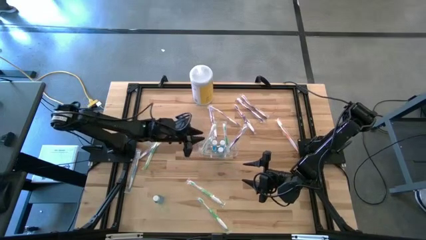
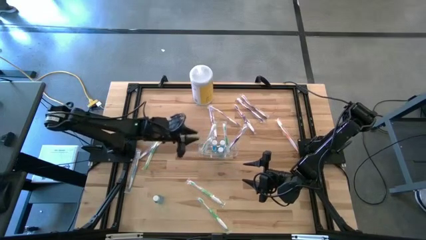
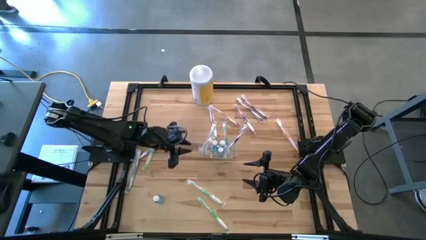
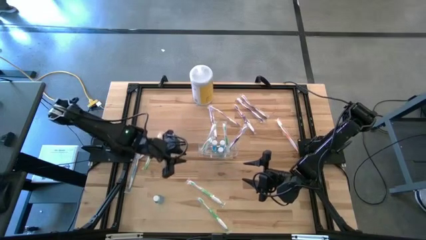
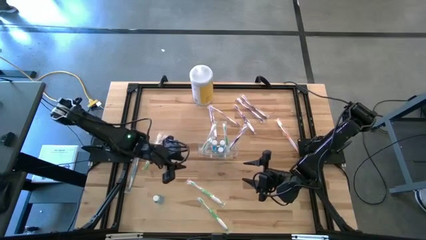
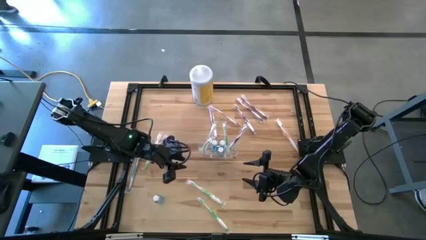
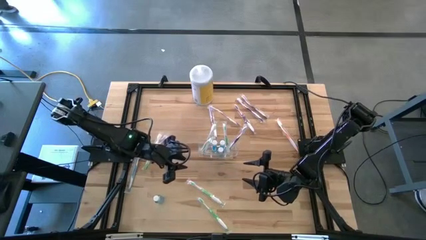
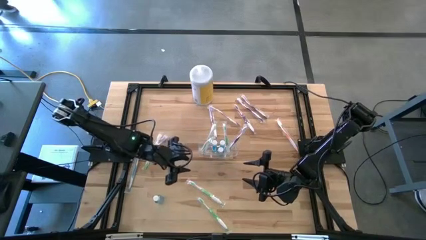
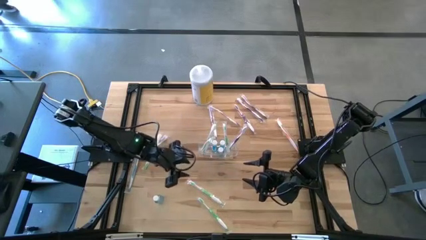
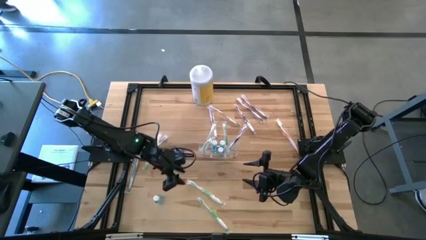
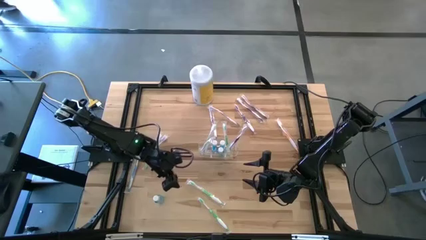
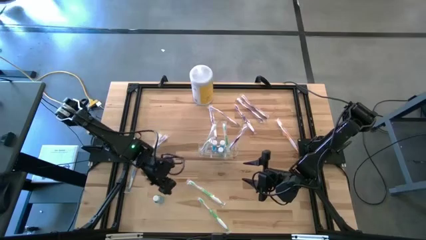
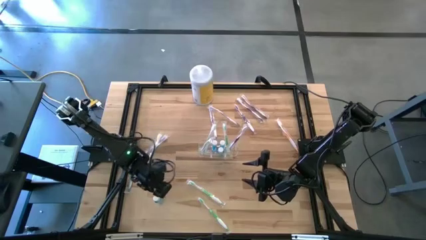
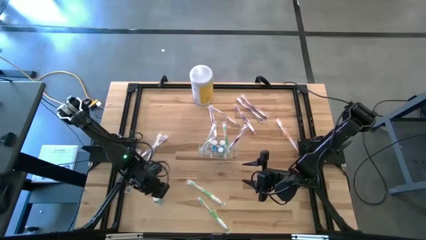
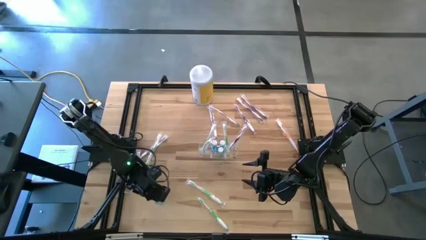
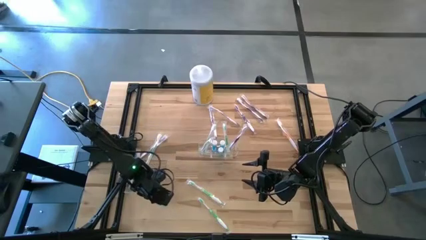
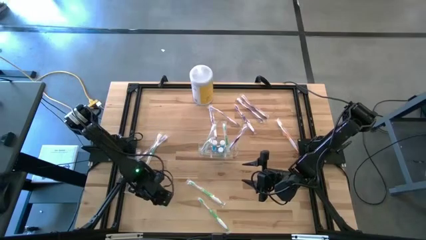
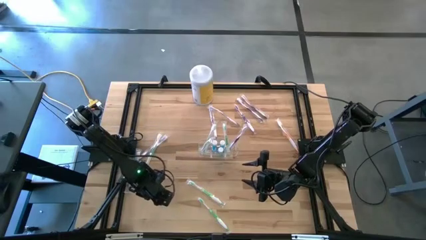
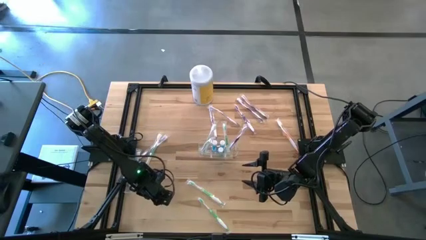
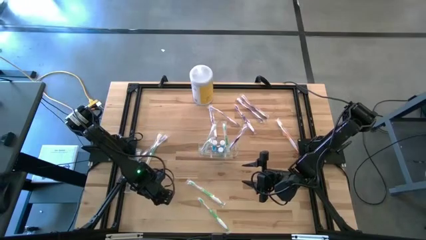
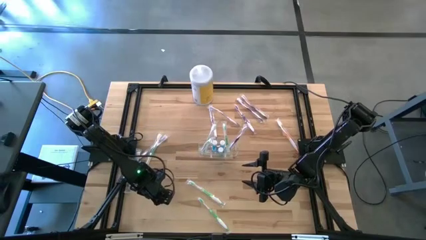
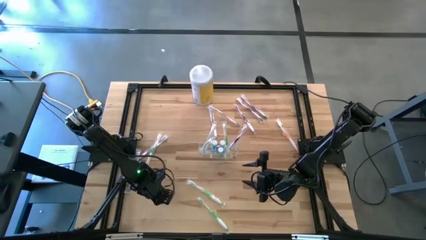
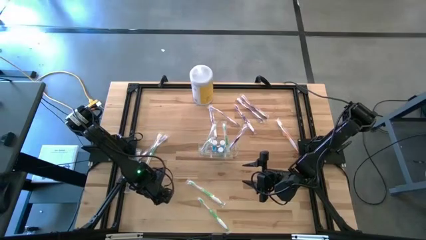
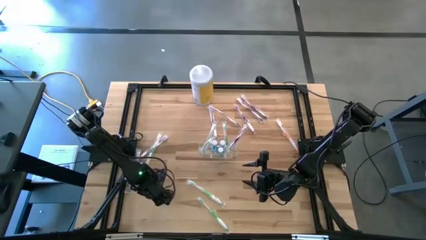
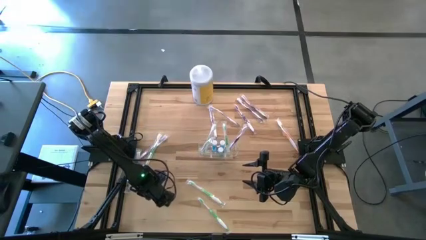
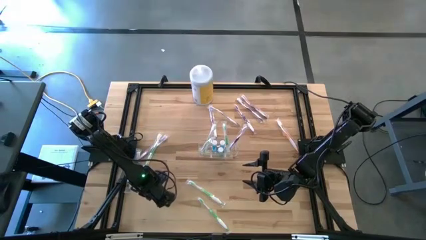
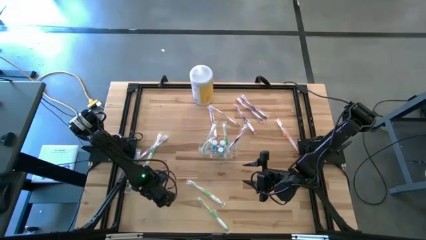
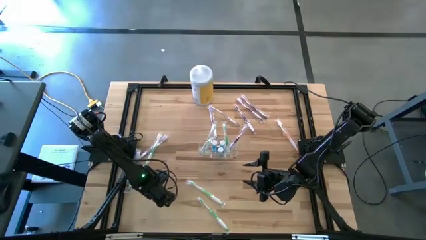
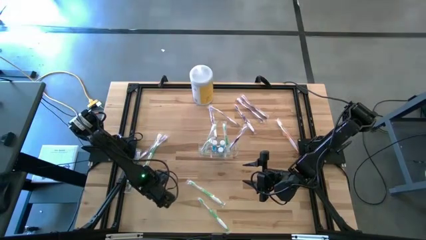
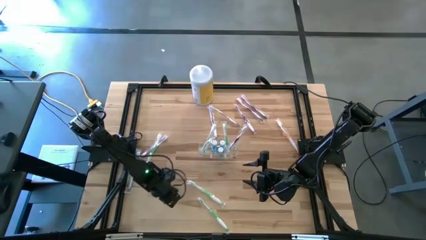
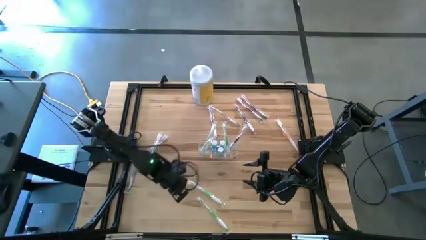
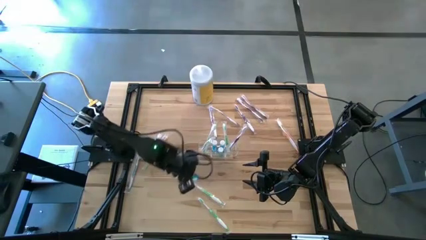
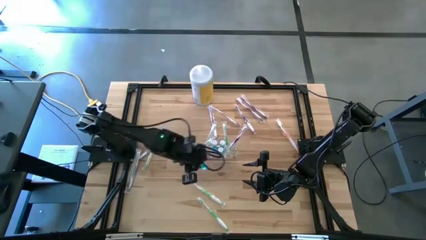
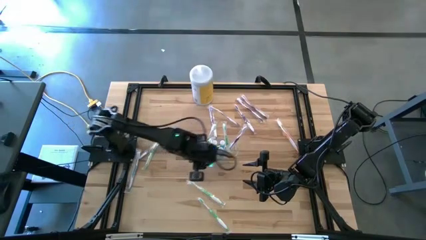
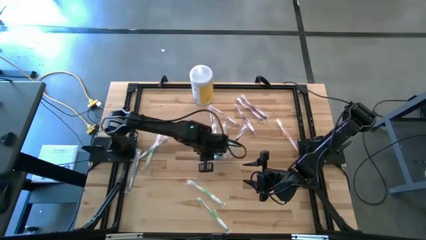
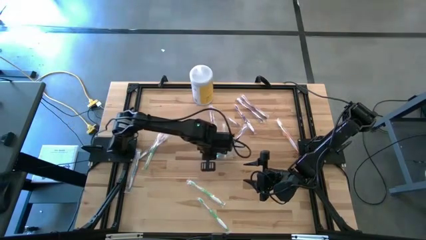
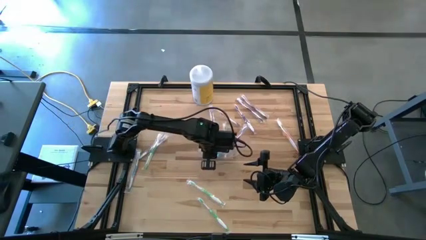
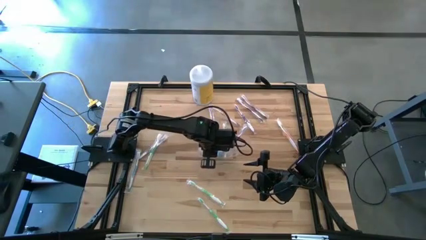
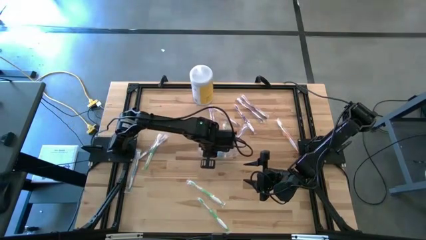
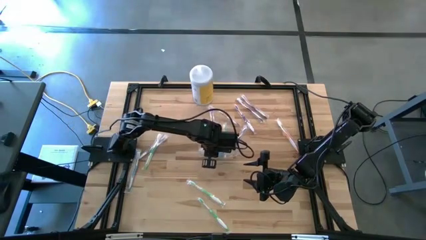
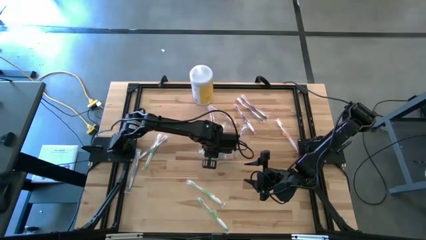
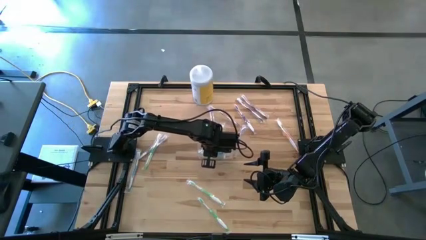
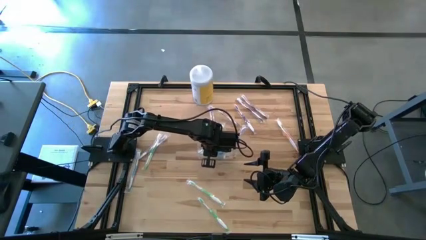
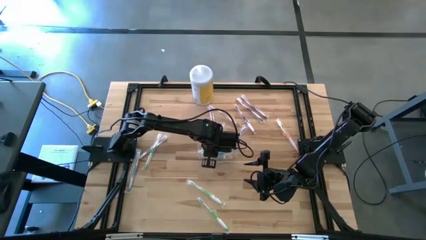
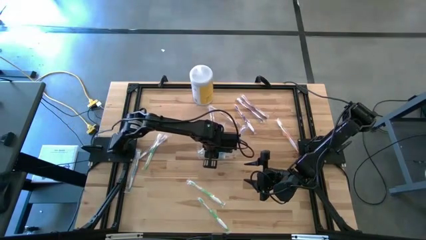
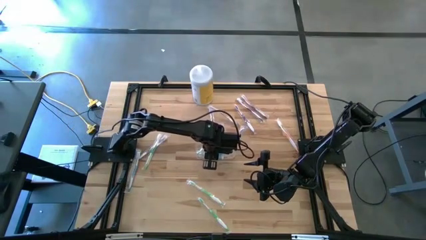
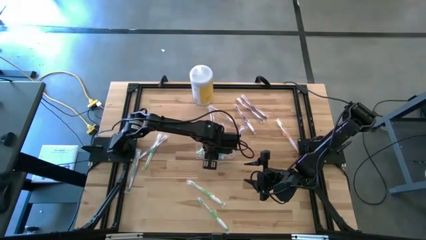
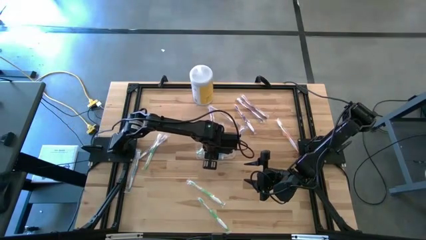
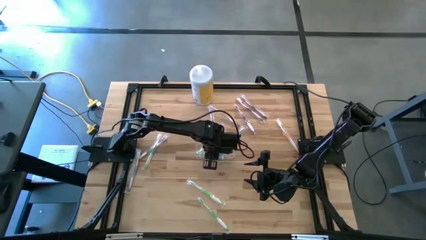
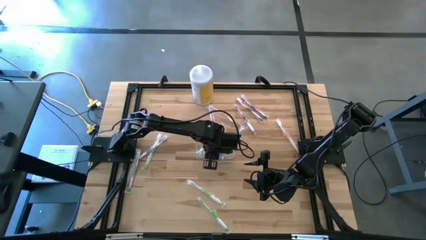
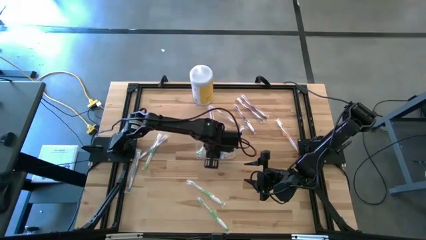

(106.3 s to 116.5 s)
Task: Pick & Place toothbrushing station
Put the mouthwash bottle into the transparent organizer

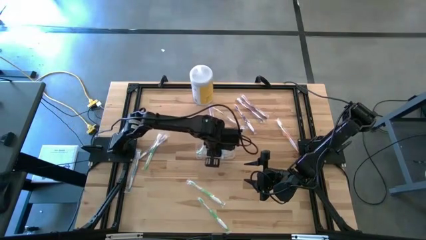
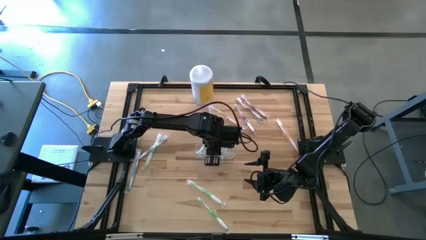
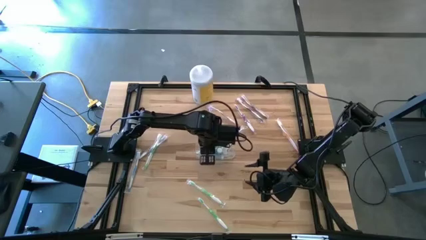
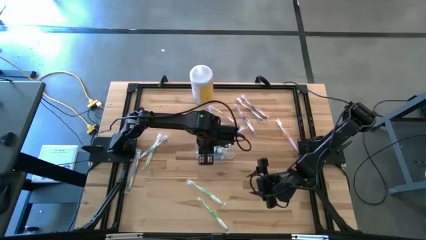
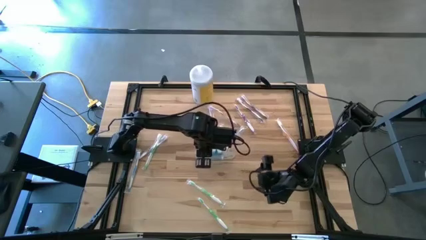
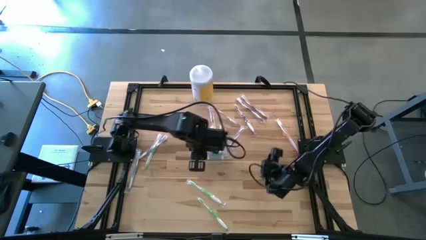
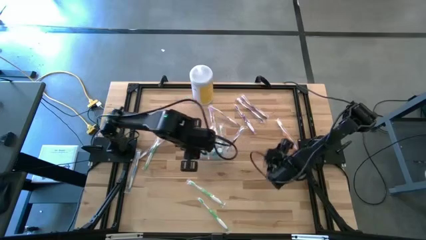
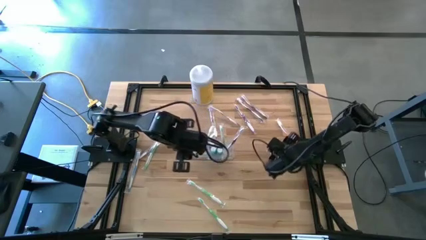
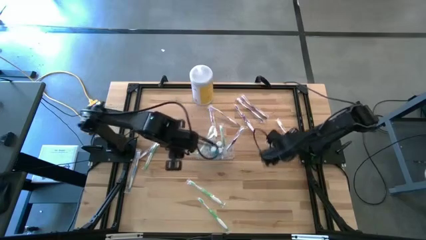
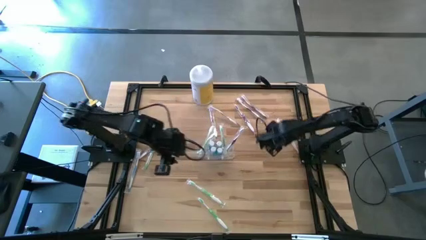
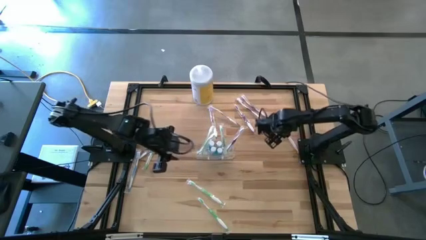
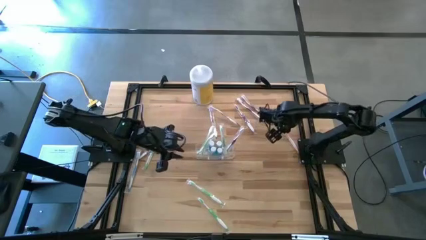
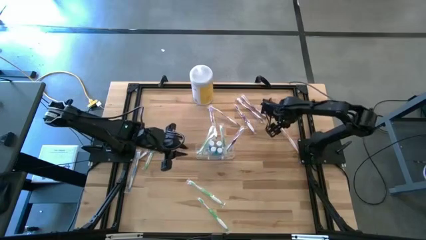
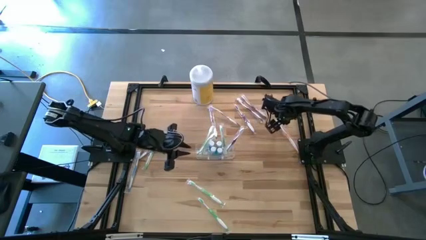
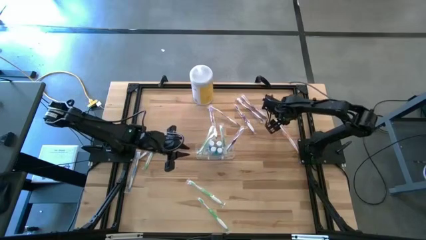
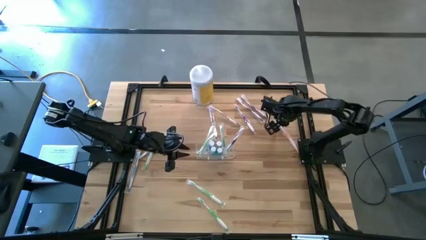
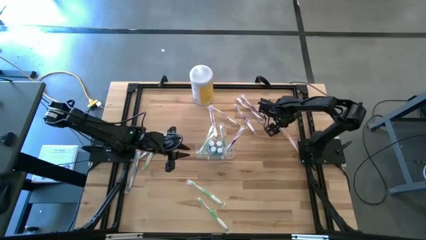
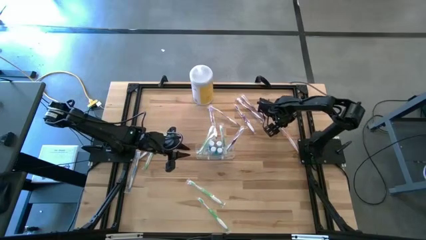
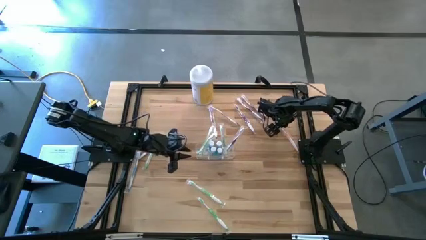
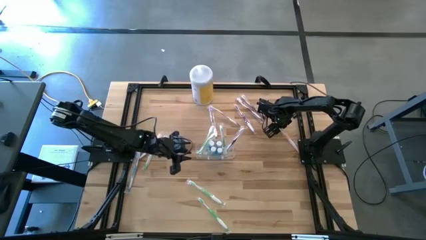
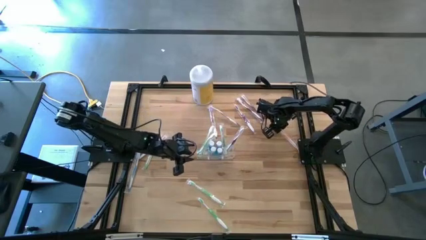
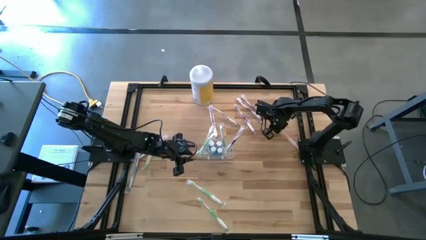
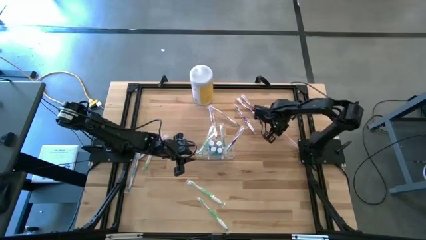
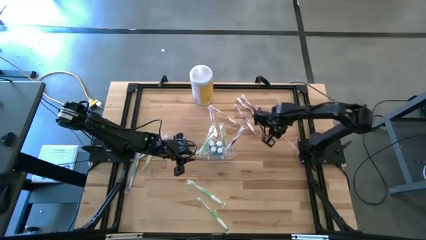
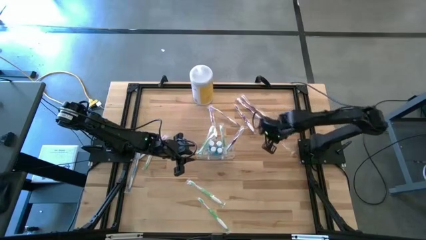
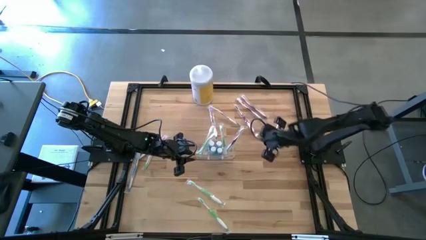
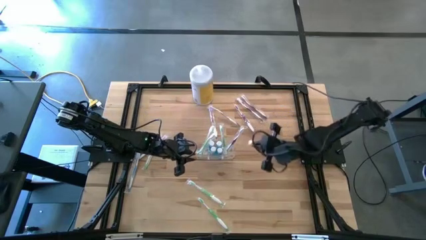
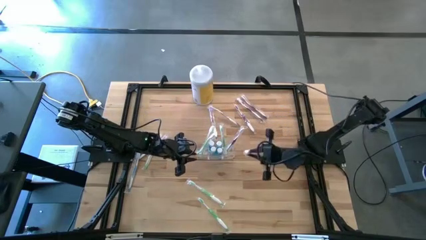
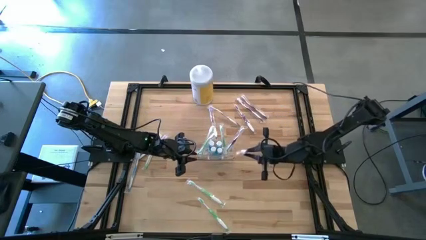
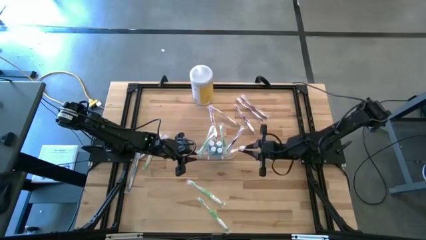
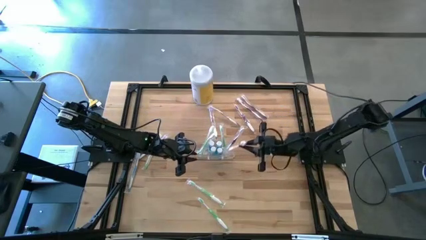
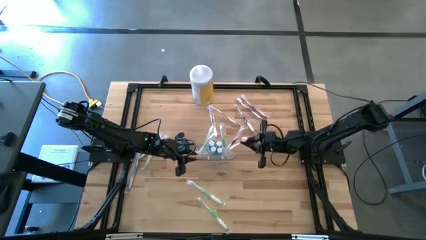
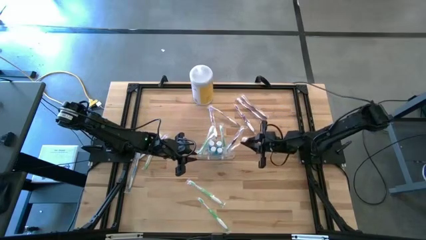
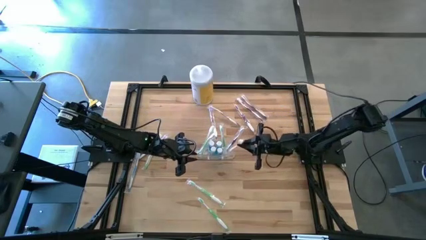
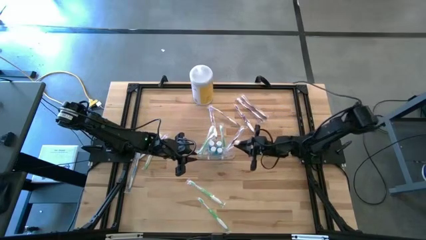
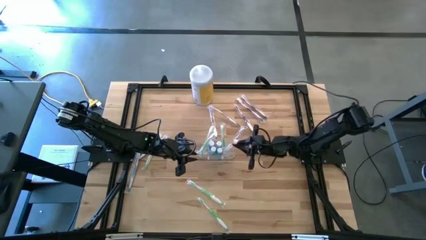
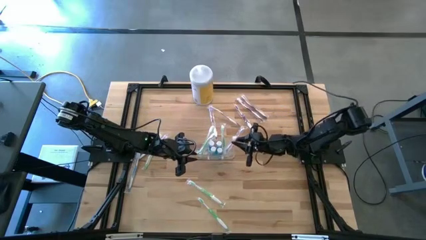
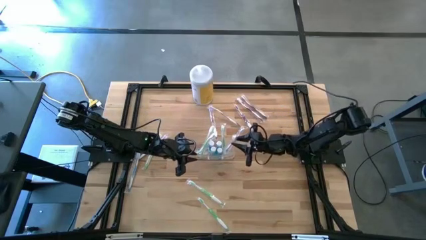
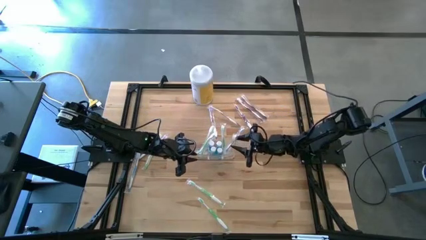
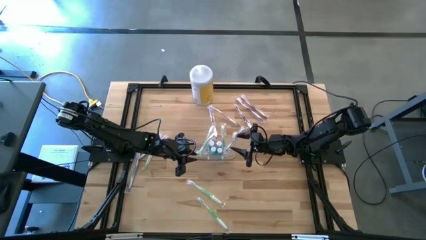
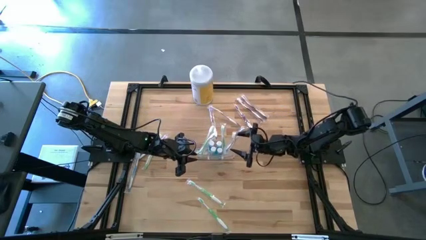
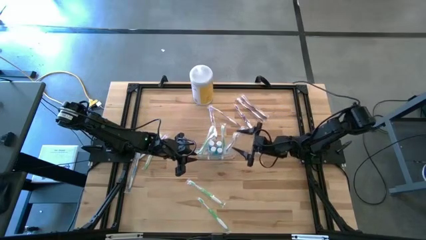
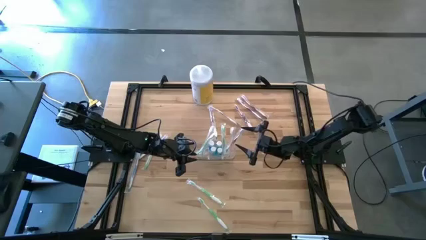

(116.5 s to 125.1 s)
Put the orange toothbrush into the transparent organizer
